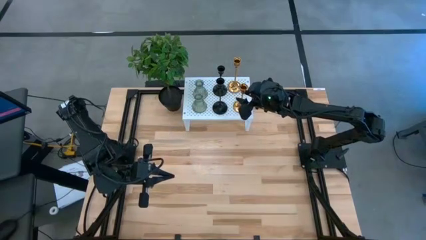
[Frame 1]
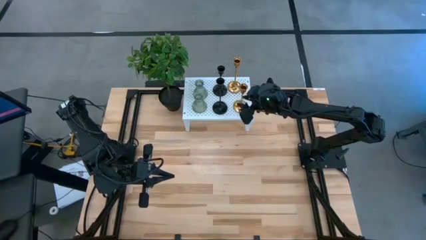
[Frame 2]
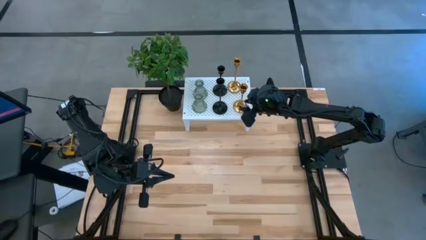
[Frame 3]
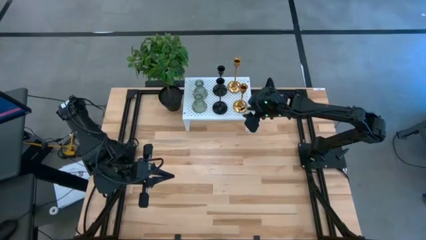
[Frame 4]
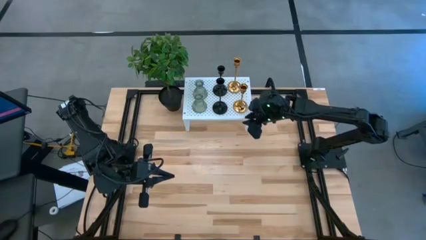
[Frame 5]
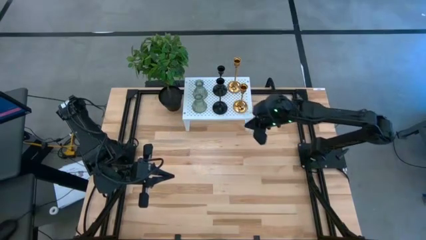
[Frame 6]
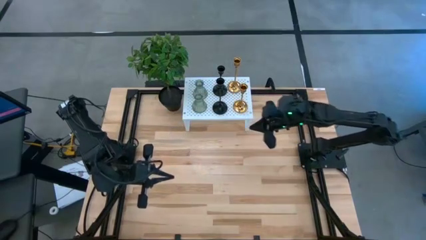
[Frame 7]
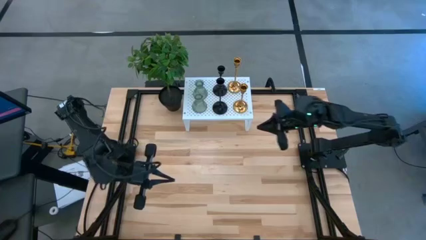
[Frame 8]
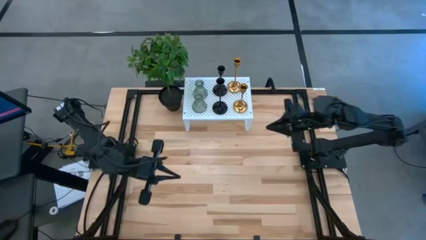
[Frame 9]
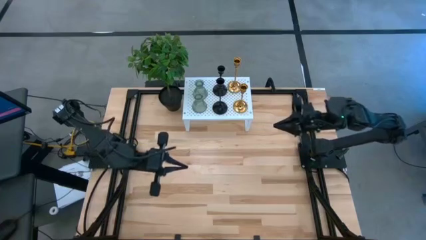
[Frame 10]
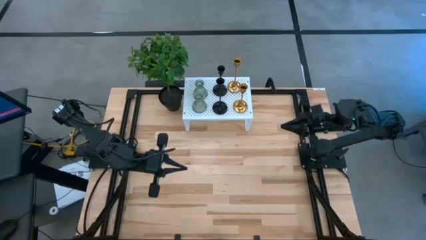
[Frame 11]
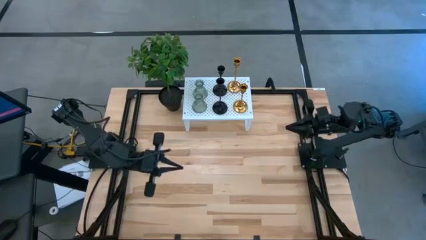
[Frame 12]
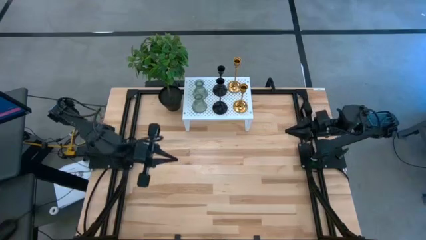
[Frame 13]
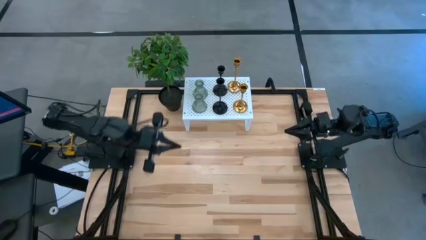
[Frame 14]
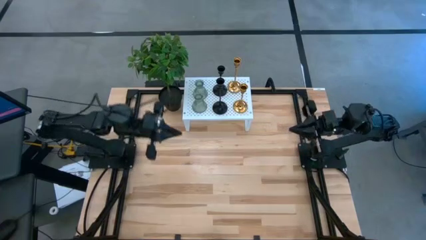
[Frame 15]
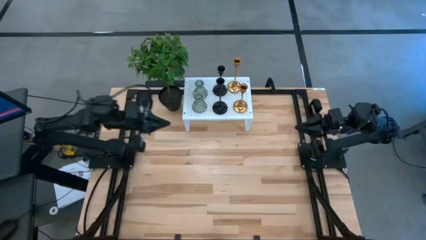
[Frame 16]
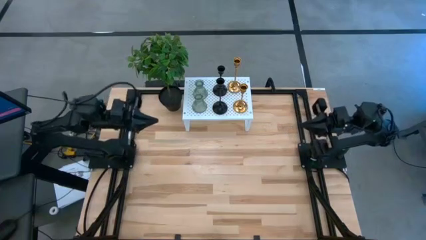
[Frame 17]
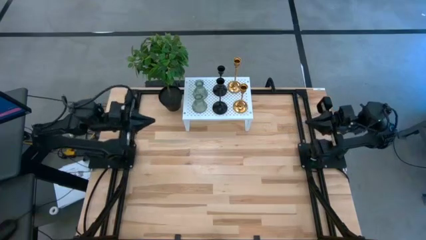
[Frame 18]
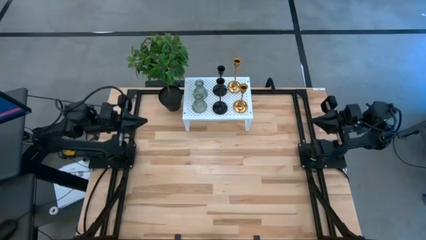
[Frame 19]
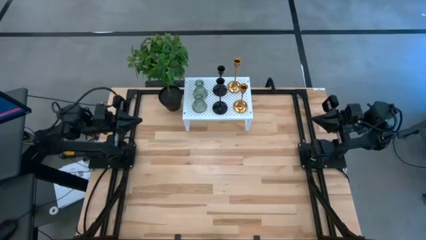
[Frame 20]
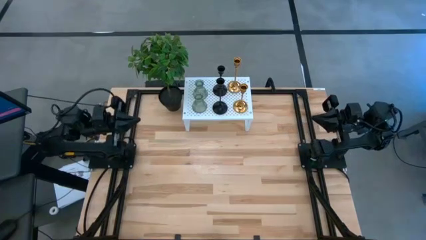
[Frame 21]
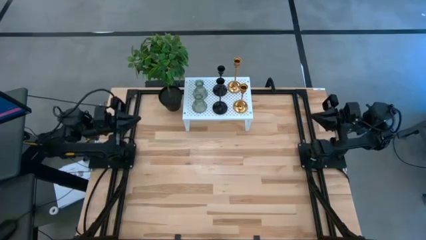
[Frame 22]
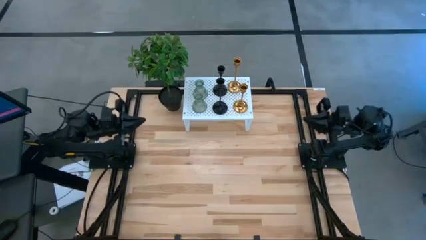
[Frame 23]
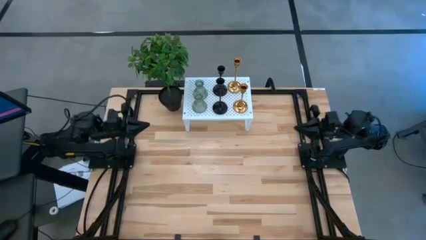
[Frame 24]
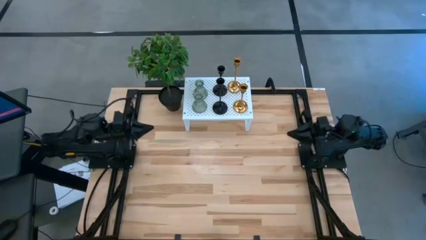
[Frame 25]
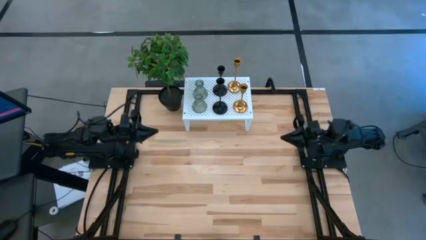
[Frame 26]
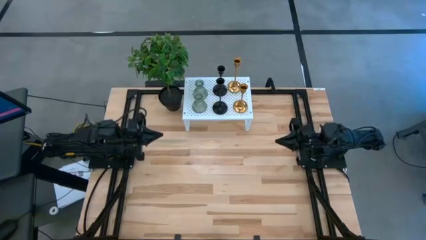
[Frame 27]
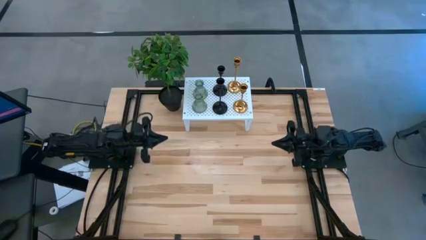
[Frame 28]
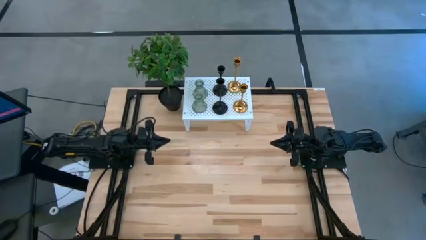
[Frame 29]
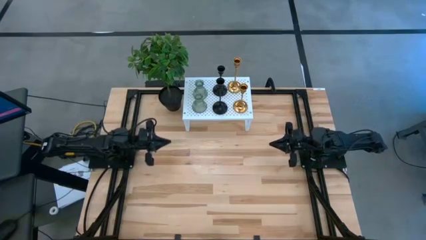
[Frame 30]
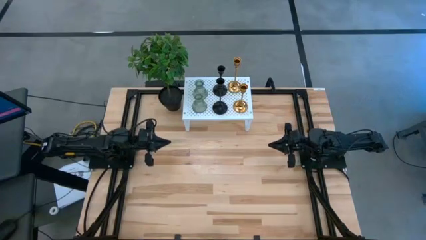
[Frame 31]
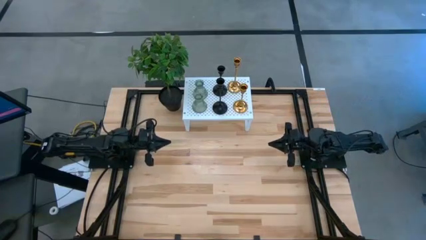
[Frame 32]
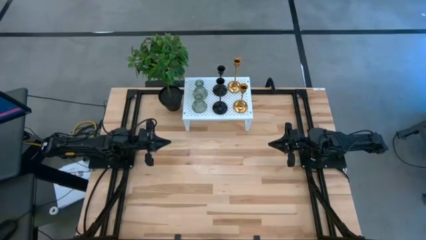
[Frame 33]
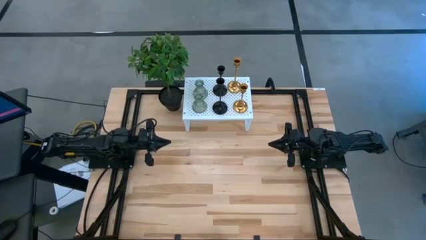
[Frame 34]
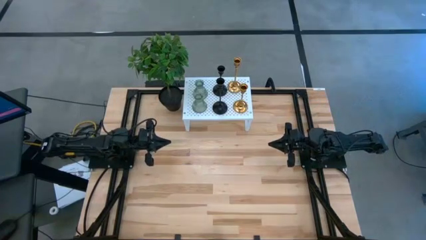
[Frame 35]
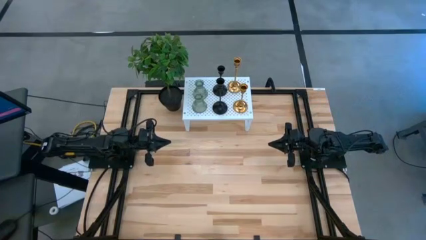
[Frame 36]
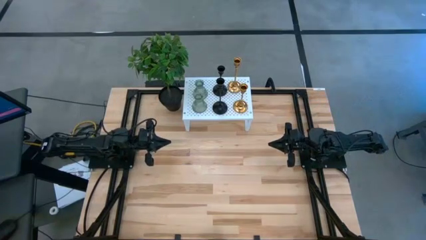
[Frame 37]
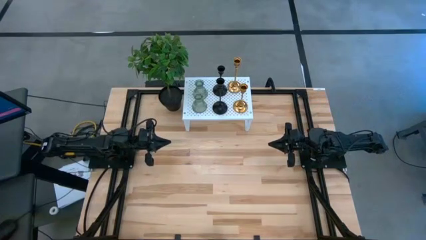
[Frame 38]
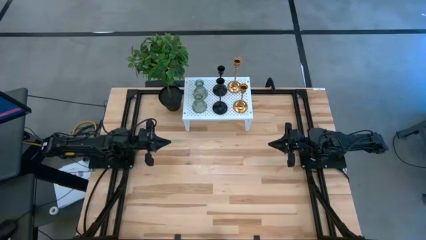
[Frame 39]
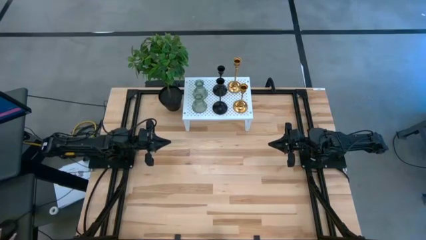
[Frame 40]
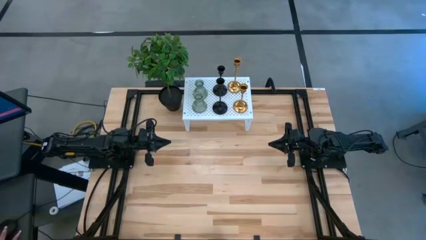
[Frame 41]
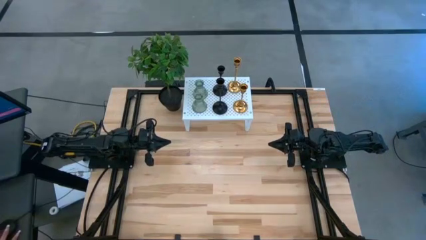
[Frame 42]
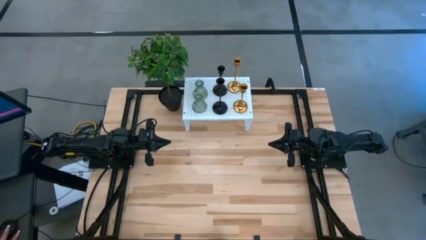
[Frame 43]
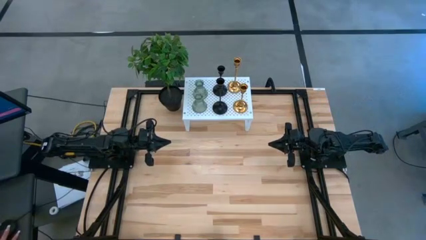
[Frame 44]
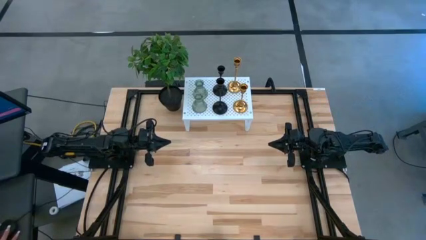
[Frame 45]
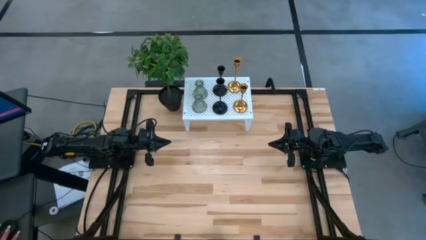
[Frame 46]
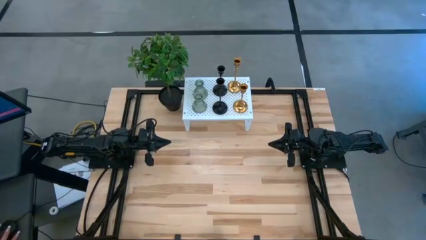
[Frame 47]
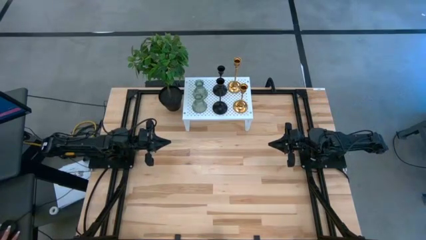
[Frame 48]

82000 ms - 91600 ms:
Task: Pick & Place candle stick holders
Return to Home Position

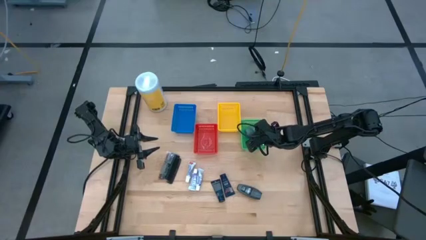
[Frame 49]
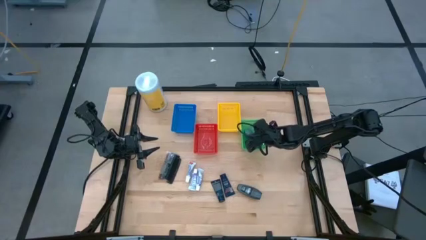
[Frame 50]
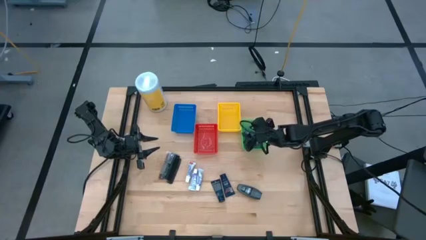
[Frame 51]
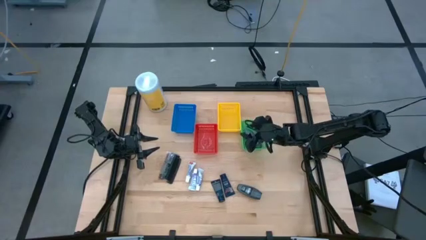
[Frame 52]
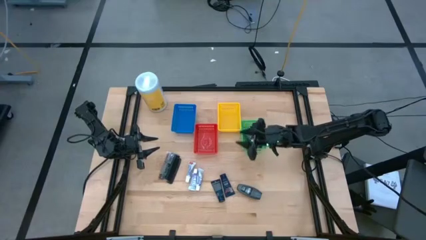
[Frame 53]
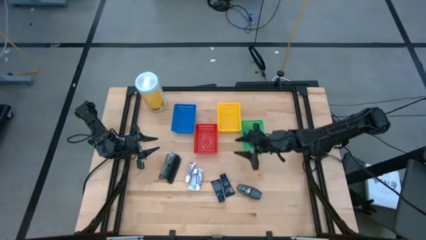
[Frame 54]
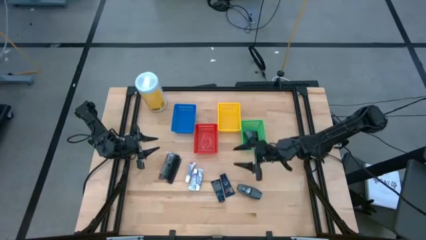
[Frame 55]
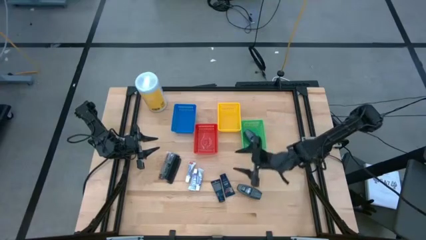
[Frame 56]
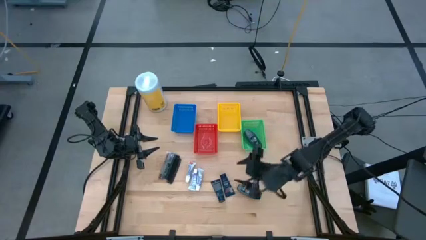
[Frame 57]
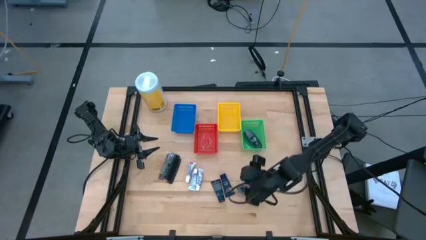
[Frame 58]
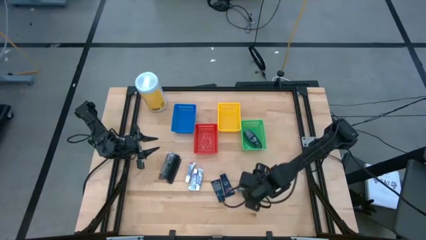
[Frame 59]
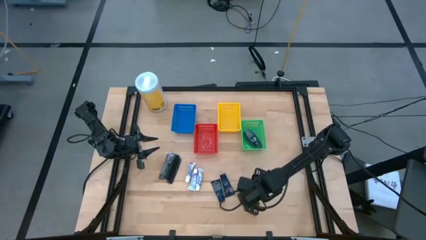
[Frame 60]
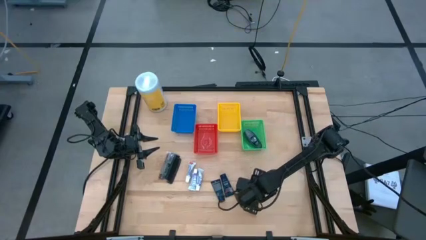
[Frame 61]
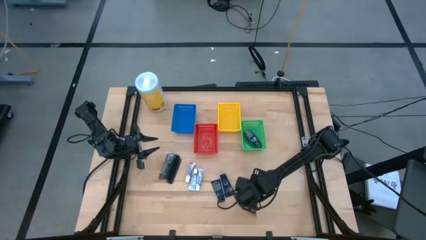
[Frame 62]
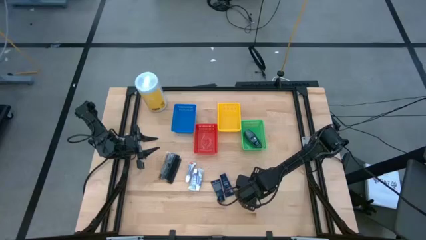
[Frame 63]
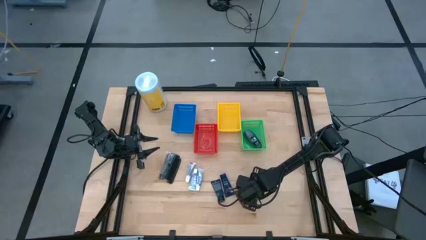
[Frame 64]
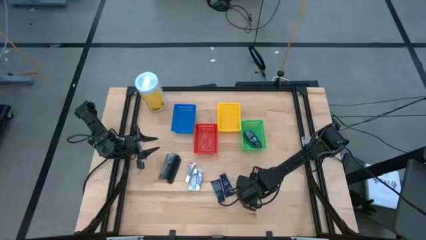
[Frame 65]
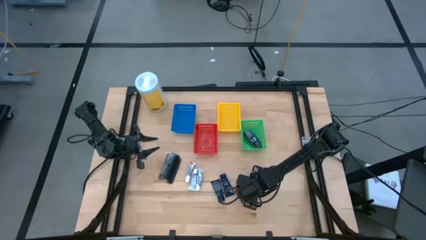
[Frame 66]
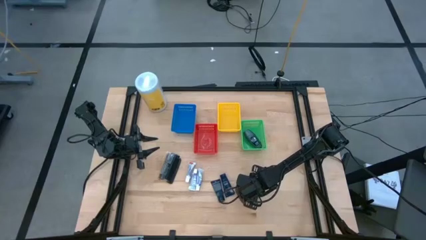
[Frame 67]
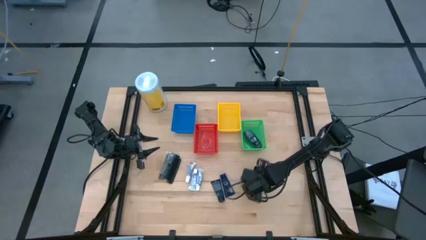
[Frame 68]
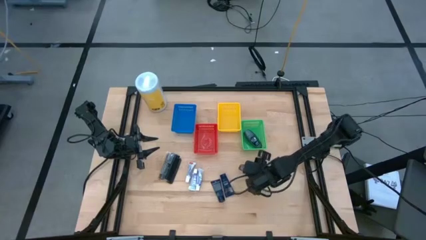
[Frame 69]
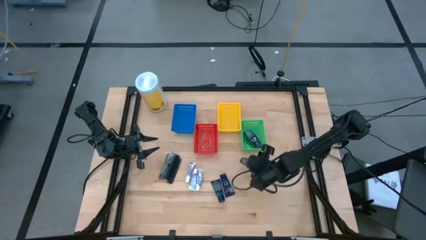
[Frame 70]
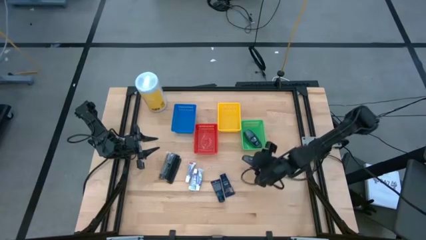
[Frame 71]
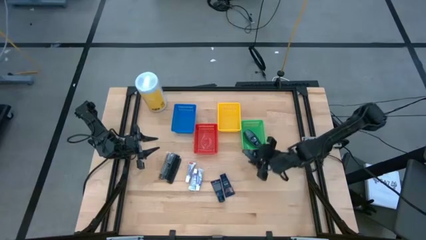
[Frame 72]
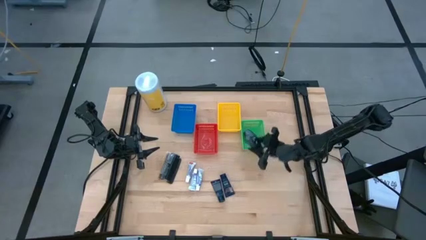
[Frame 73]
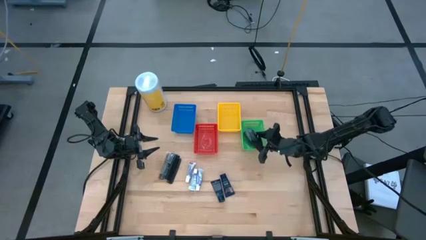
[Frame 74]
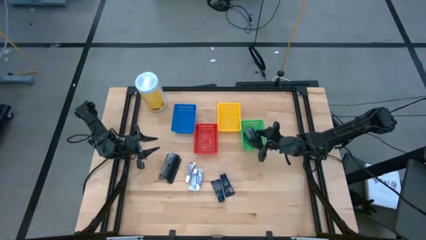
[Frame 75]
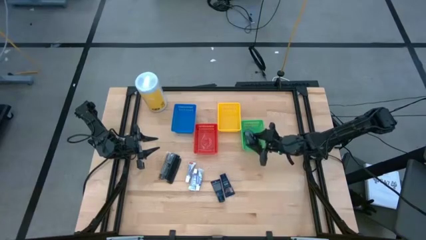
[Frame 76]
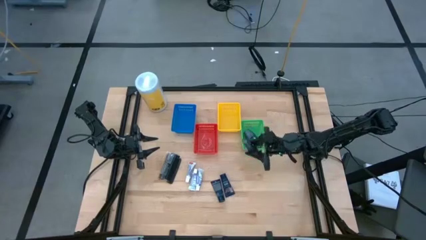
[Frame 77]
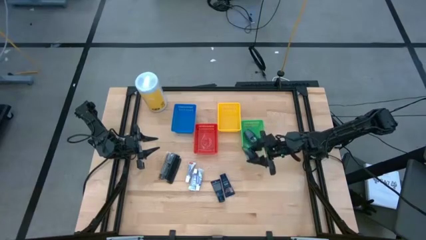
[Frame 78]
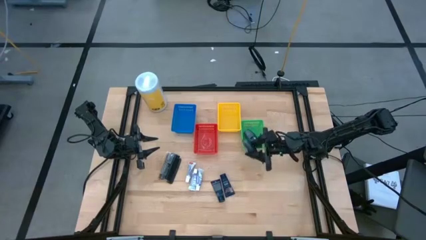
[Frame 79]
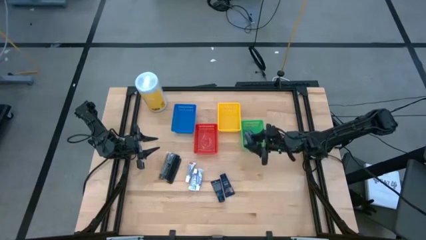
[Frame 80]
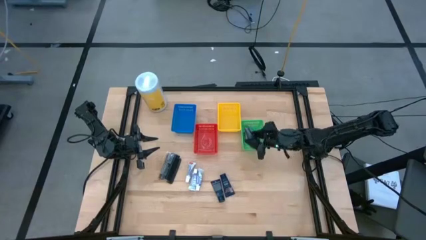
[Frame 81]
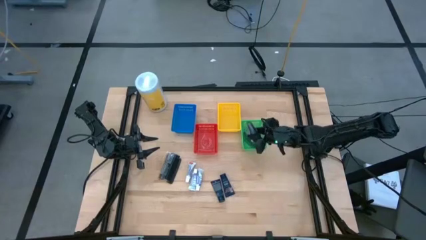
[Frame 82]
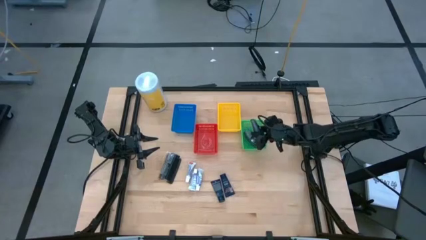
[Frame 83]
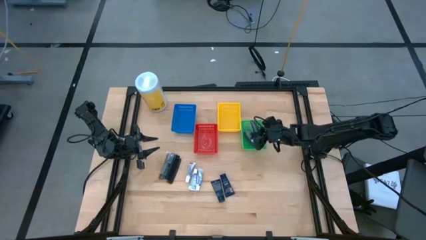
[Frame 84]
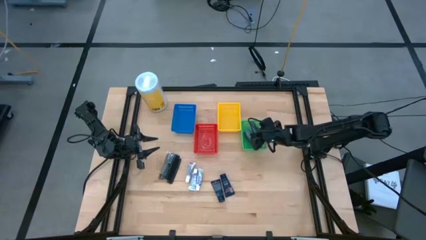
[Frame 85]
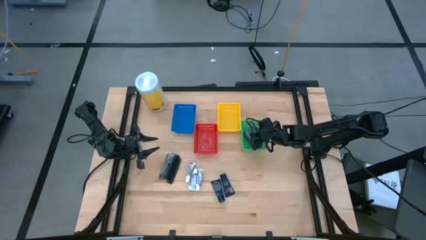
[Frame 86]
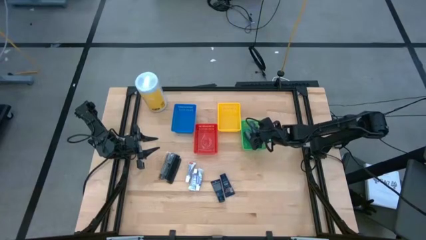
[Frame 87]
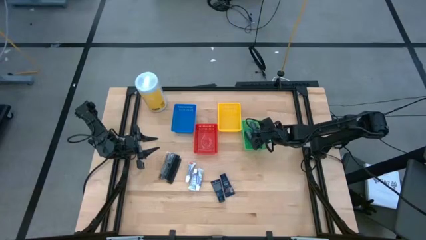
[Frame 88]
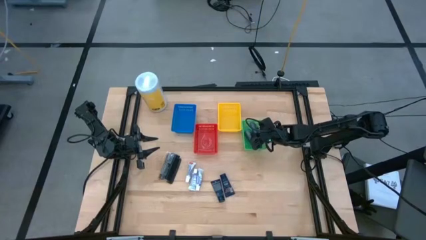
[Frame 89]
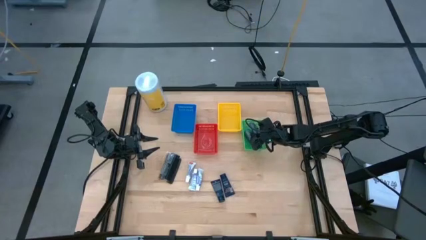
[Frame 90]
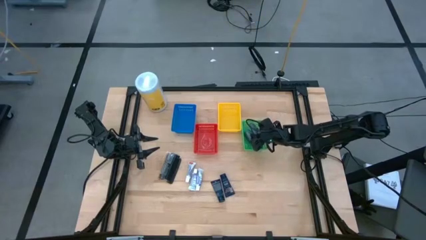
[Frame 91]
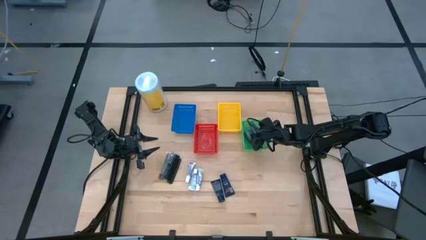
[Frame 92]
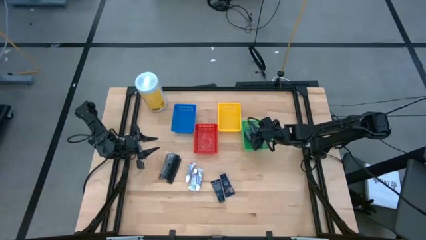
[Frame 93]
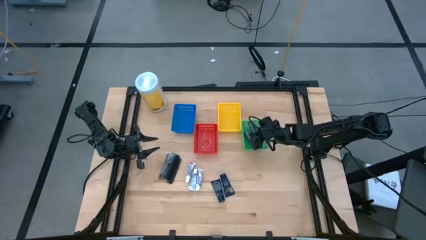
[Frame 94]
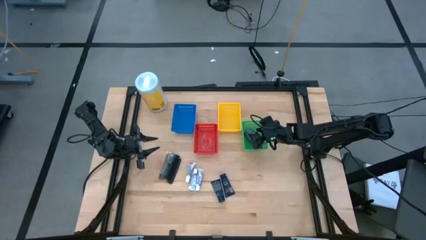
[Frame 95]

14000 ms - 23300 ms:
Task: Pick & Place Travel size toiletries
Put the black deodorant into the green bin
